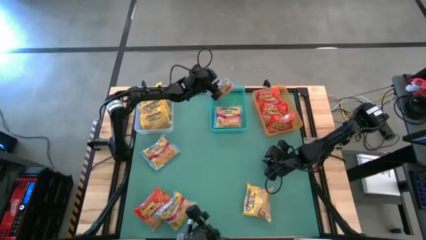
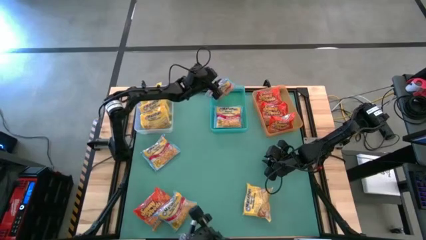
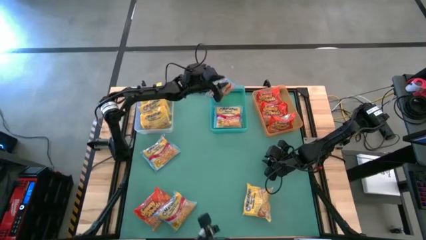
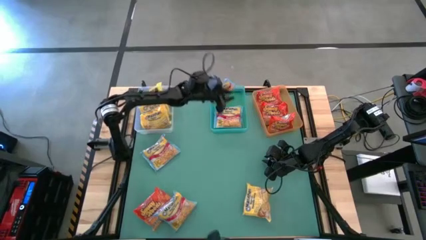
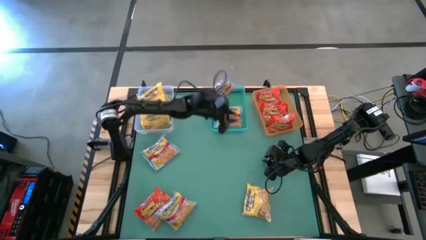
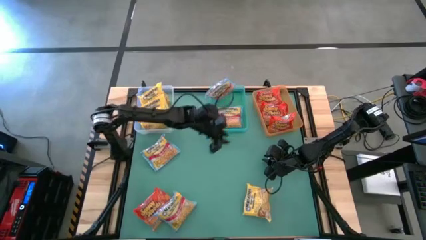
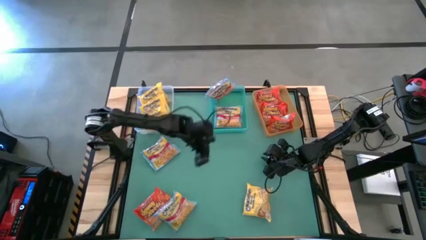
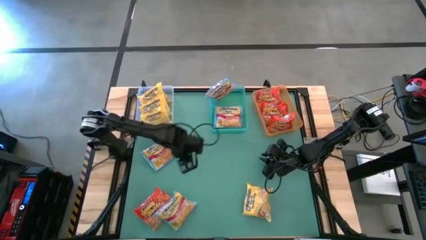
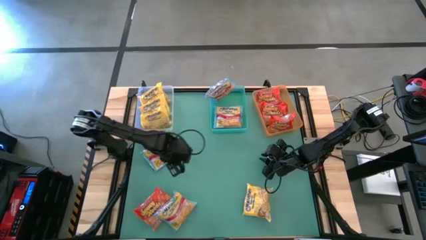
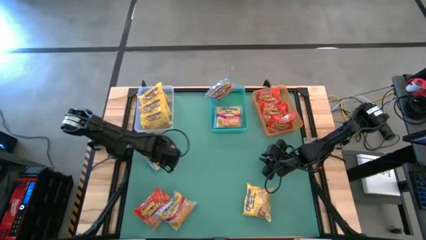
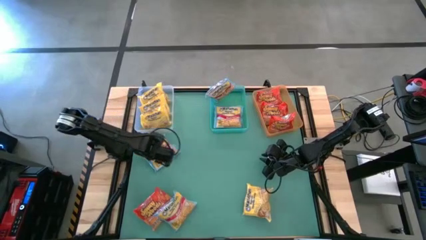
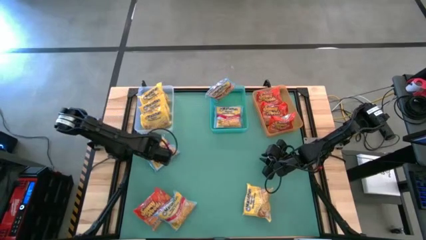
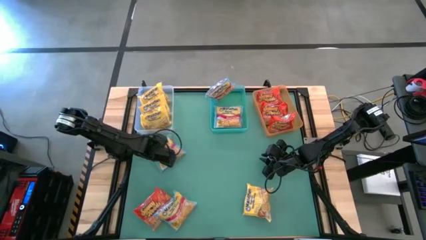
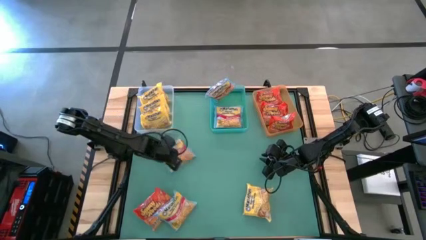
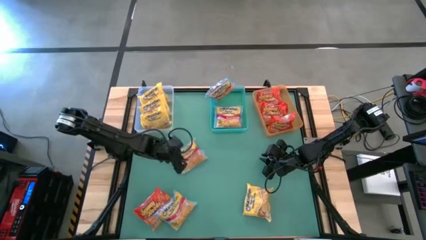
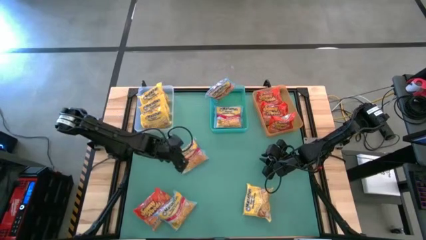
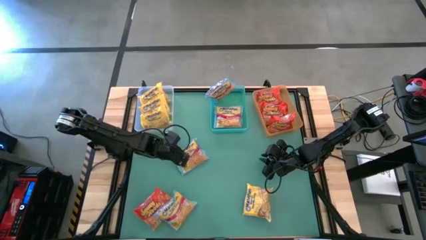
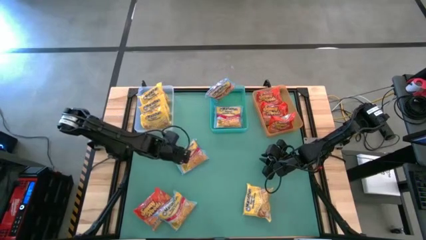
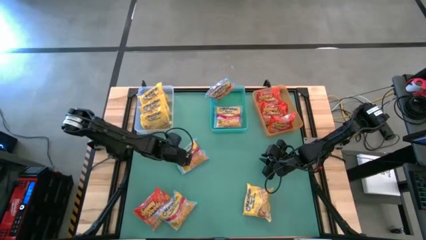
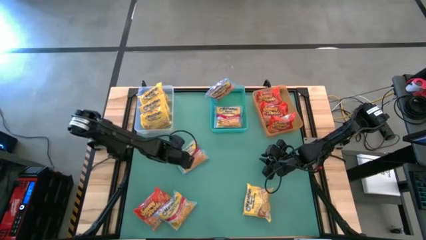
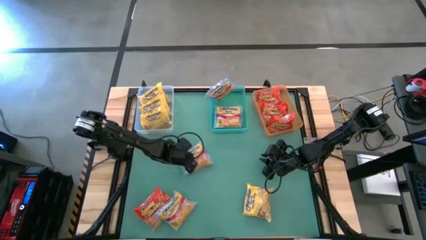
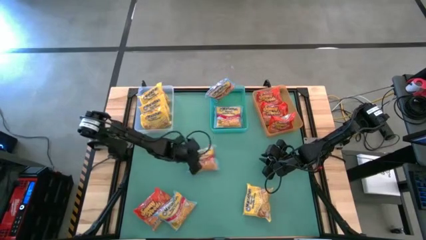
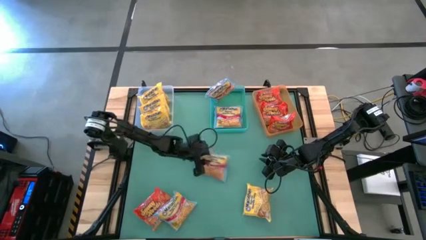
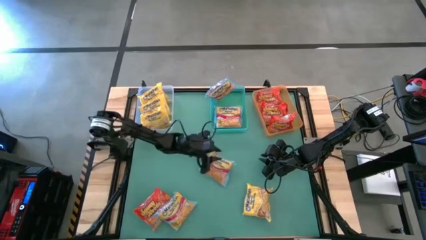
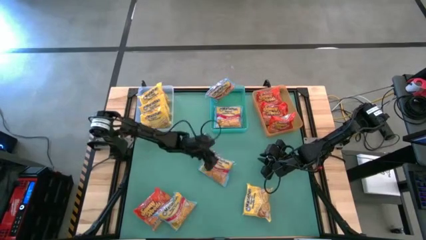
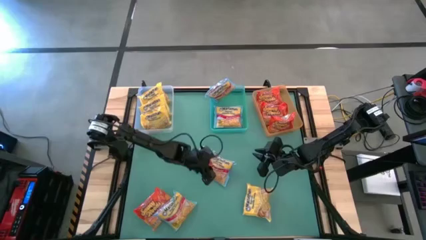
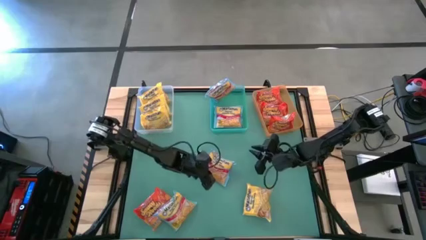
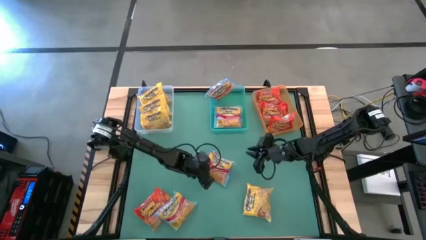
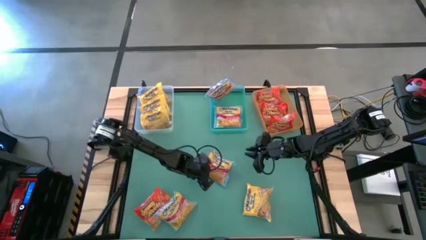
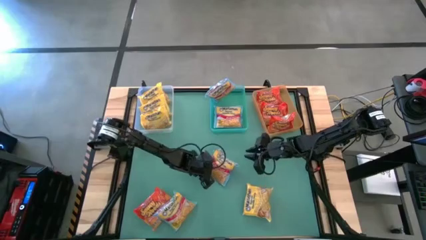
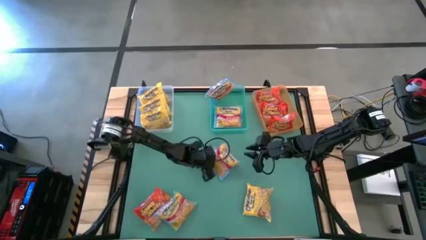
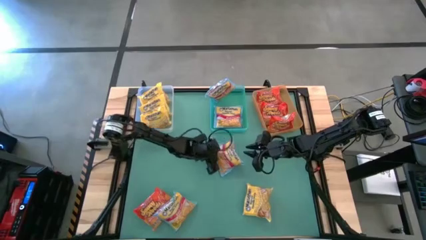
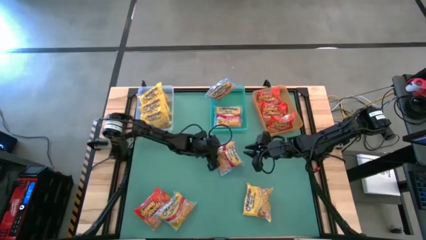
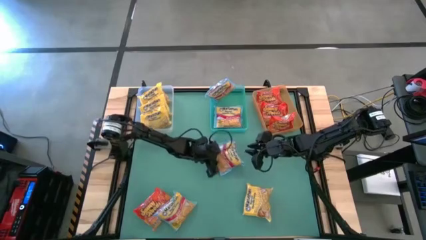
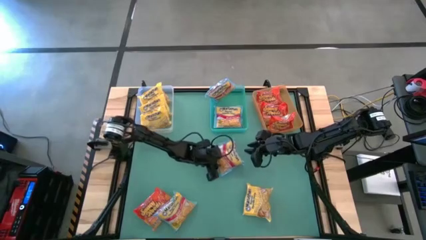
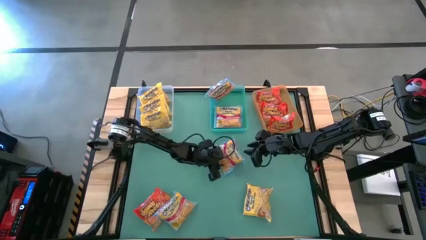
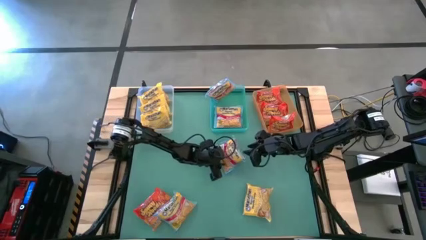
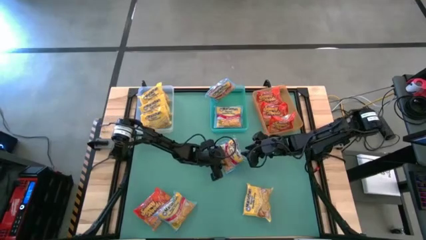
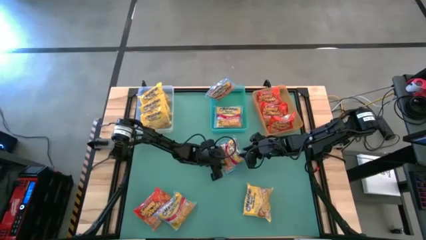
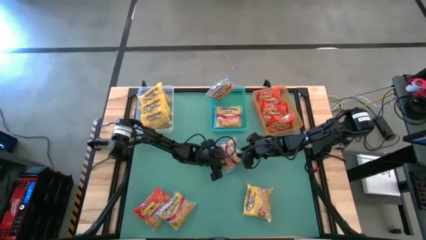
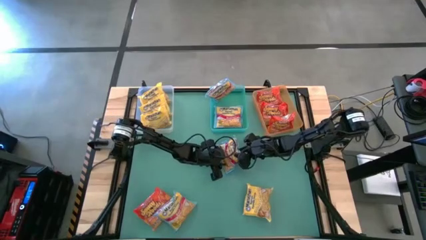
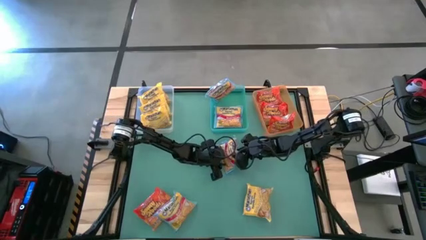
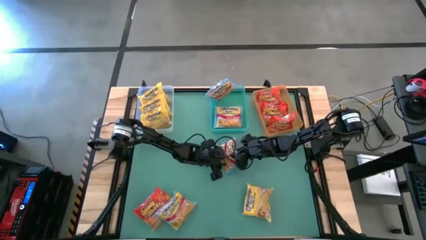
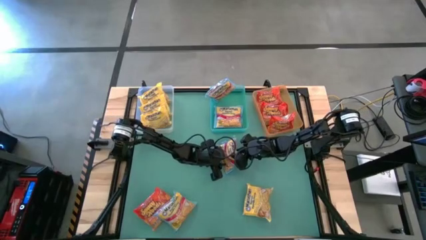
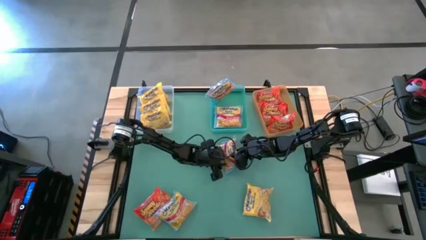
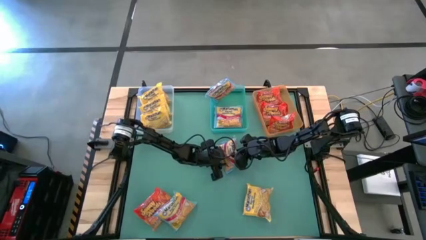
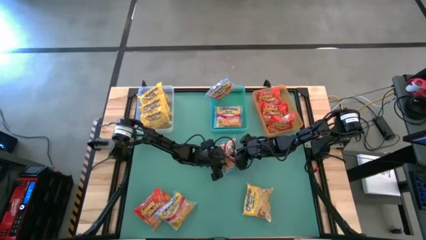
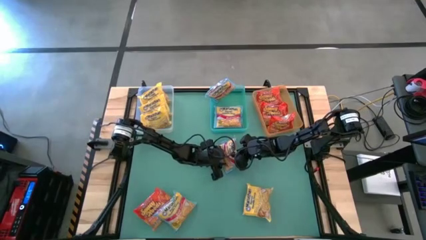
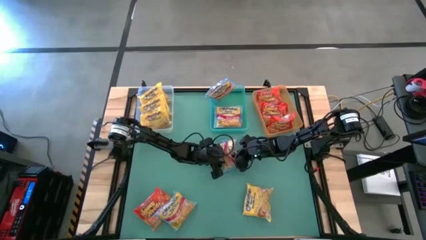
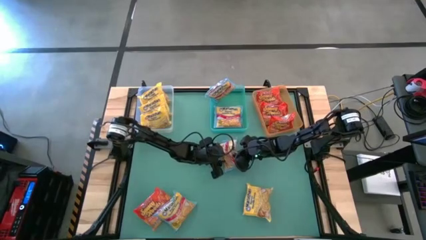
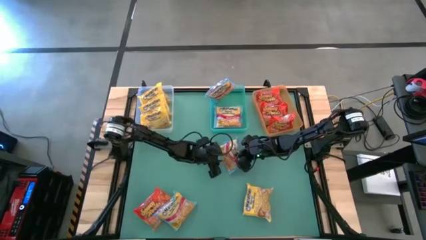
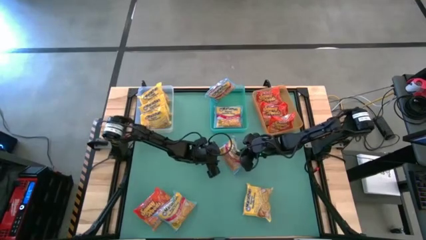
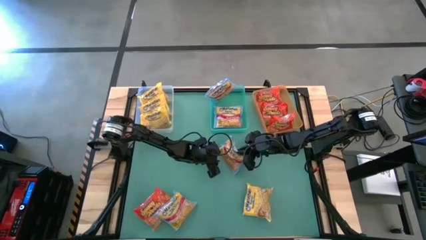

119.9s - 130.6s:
Task: Sort Maruchan noodles
Put the blue noodle pack into the green bin

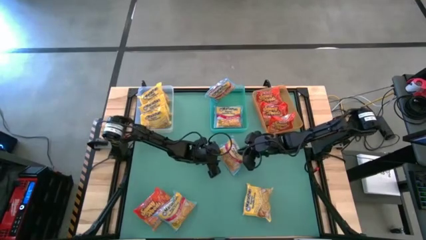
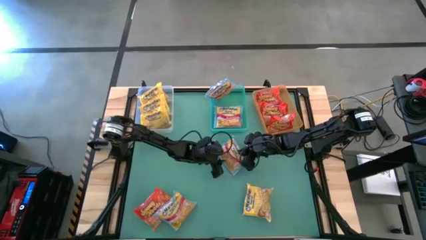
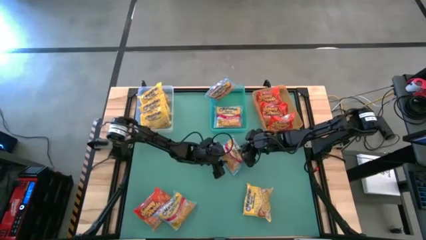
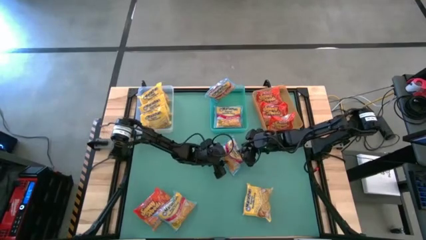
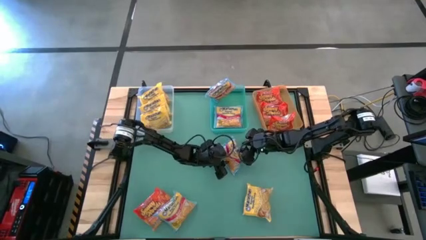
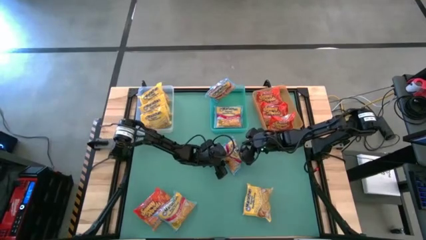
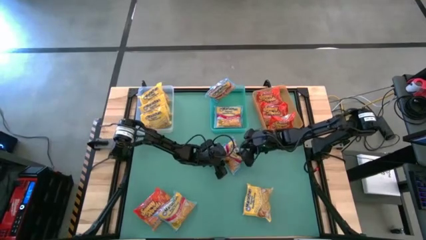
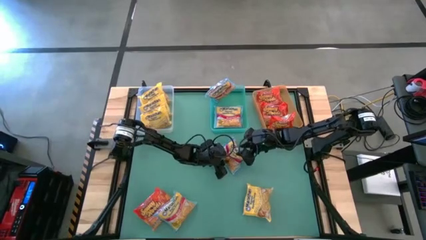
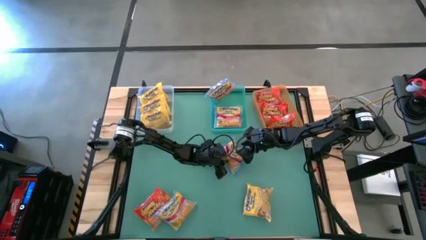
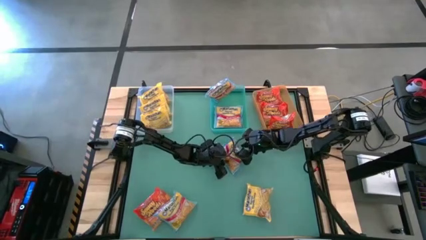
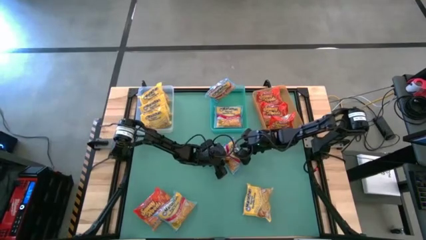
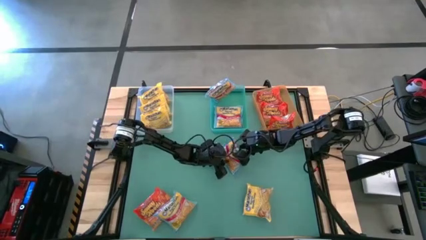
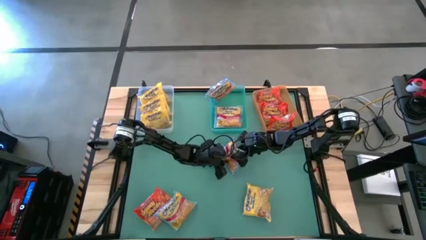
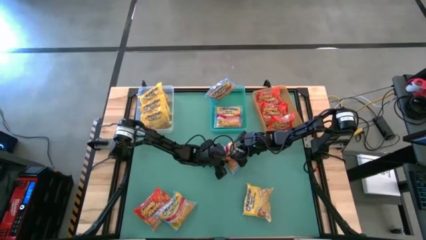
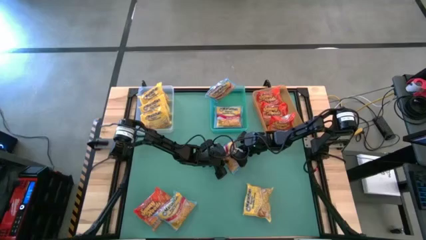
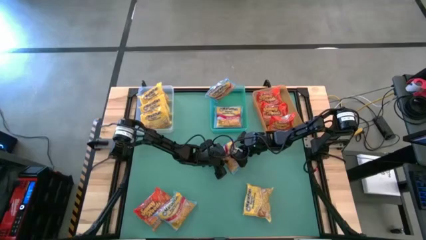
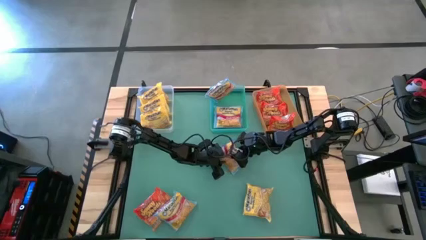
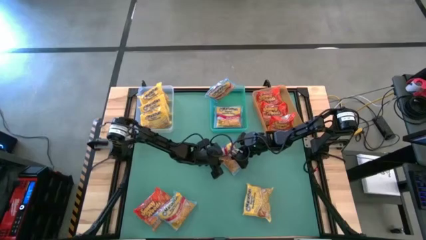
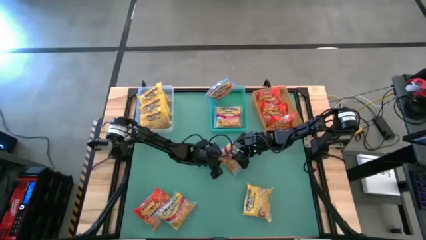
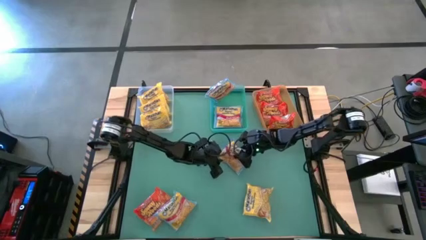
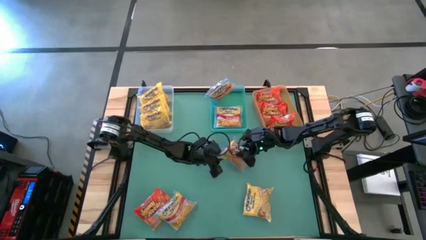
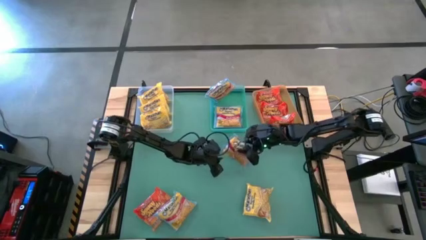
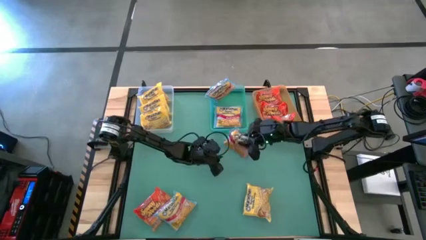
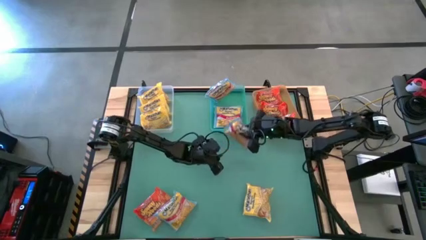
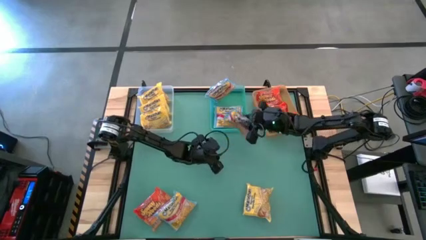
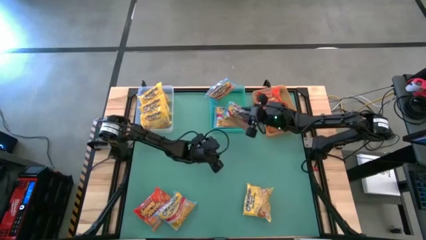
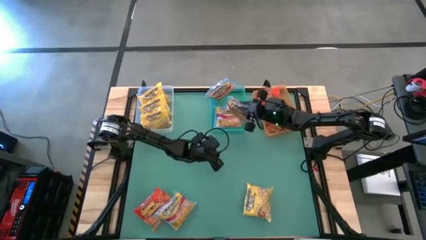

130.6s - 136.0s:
Put the blue noodle pack into the green bin
